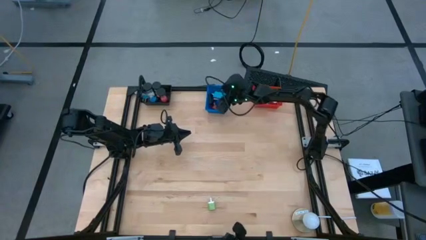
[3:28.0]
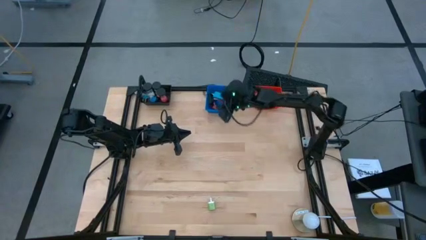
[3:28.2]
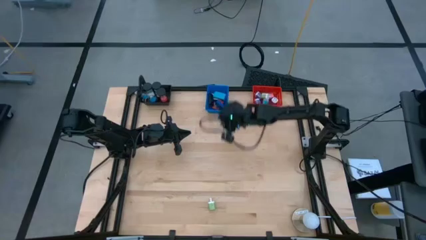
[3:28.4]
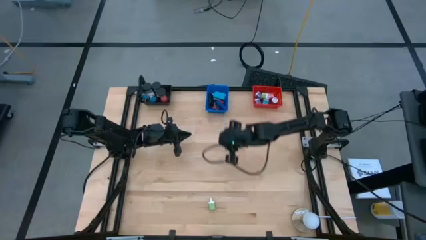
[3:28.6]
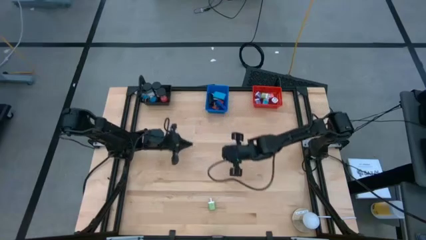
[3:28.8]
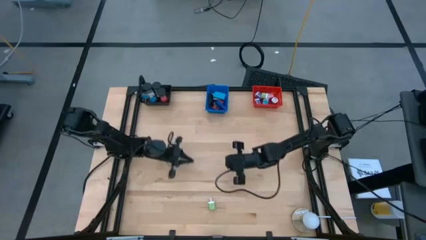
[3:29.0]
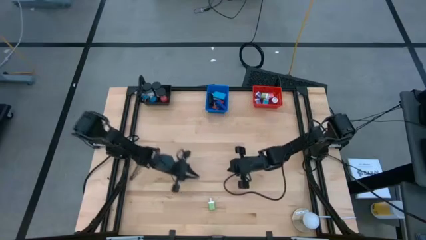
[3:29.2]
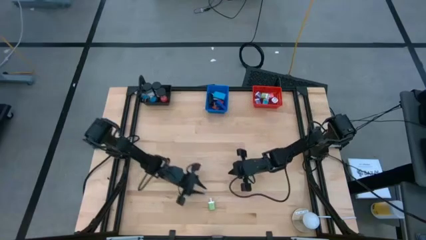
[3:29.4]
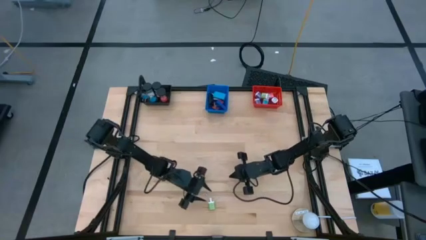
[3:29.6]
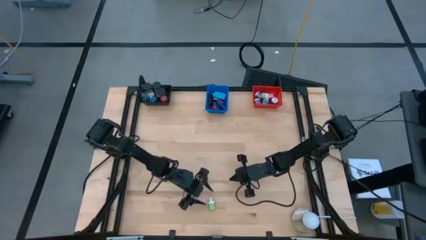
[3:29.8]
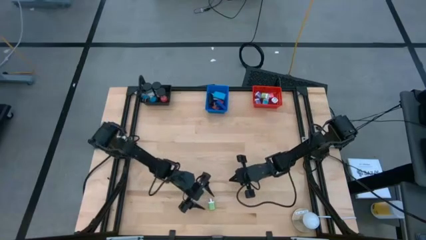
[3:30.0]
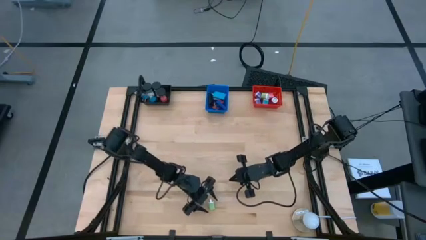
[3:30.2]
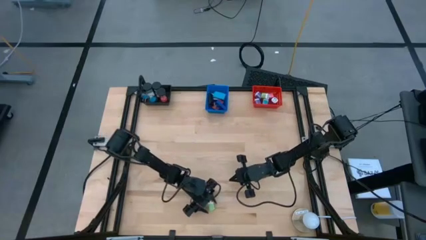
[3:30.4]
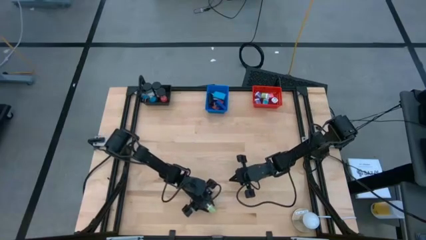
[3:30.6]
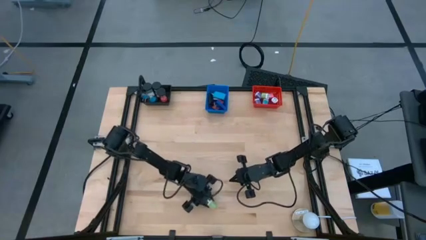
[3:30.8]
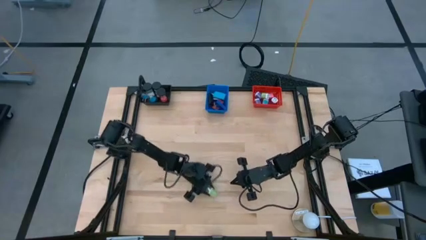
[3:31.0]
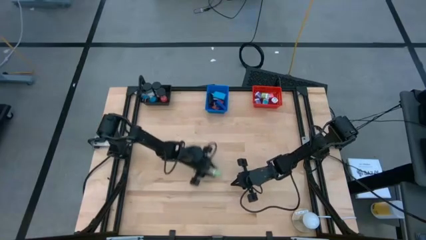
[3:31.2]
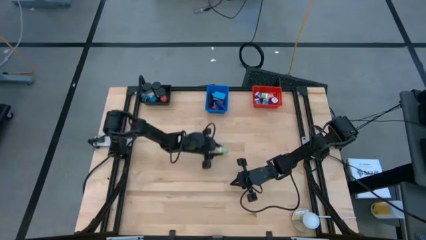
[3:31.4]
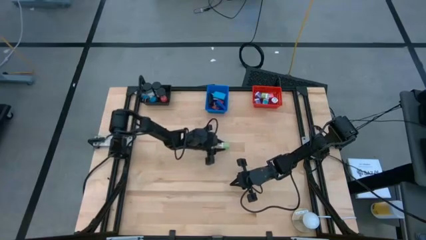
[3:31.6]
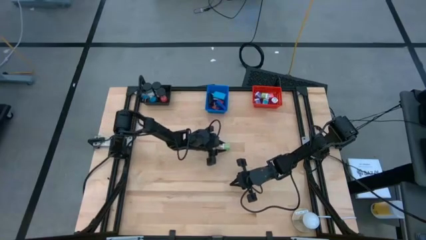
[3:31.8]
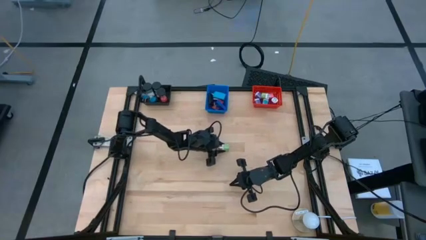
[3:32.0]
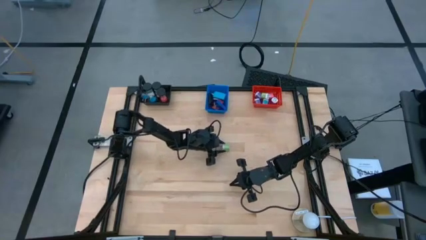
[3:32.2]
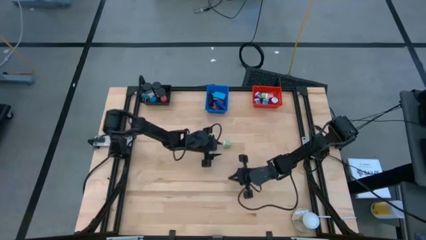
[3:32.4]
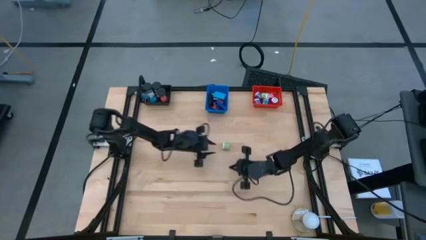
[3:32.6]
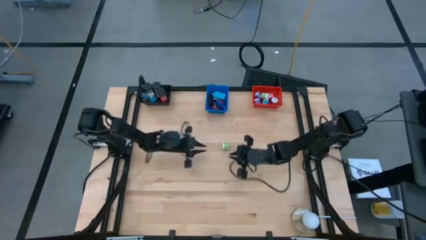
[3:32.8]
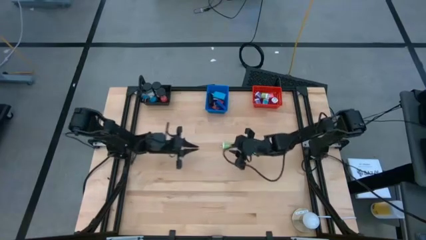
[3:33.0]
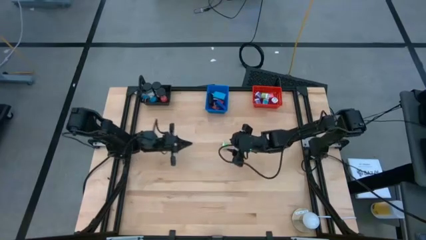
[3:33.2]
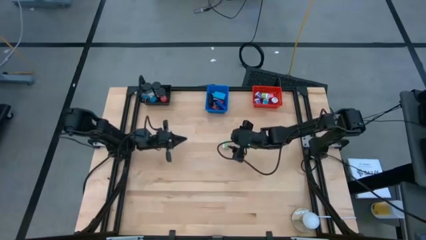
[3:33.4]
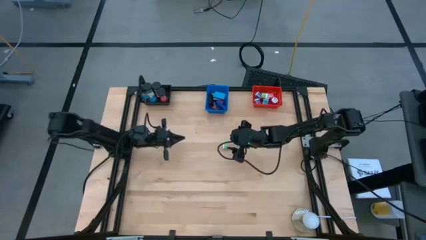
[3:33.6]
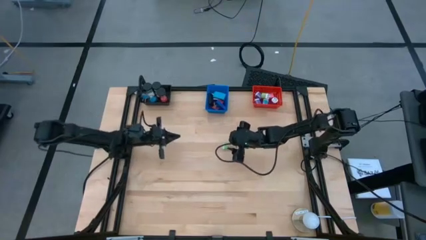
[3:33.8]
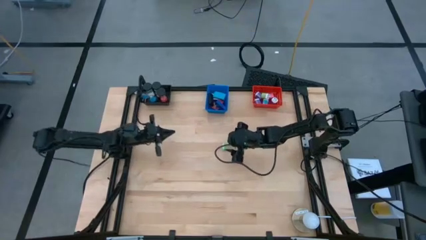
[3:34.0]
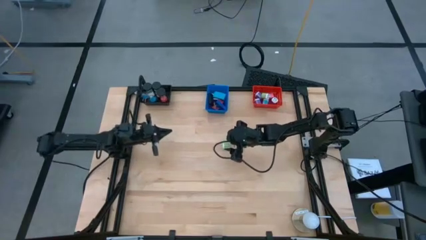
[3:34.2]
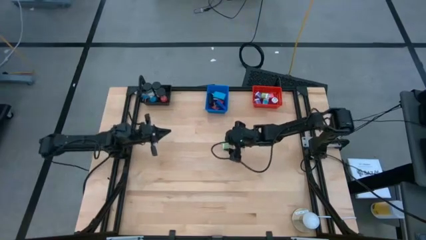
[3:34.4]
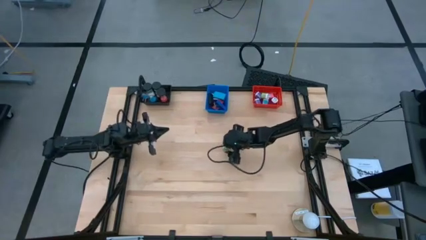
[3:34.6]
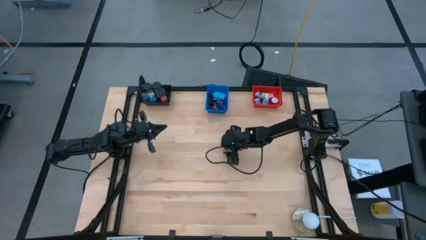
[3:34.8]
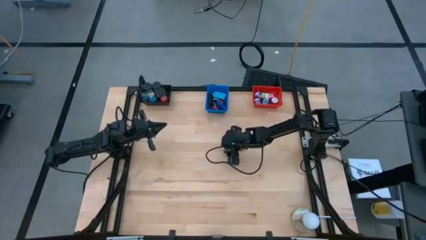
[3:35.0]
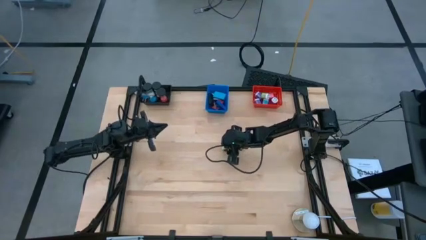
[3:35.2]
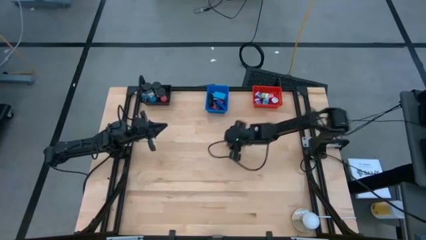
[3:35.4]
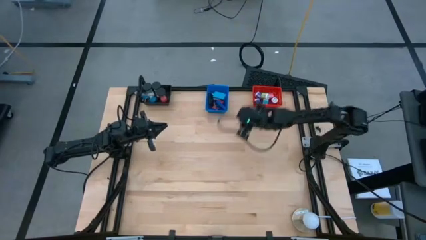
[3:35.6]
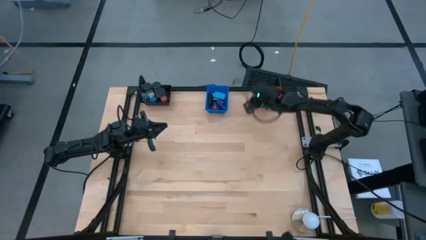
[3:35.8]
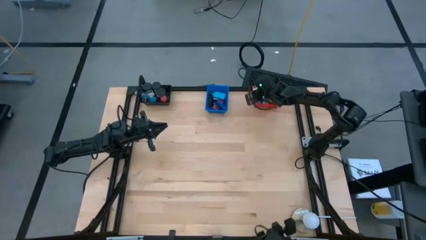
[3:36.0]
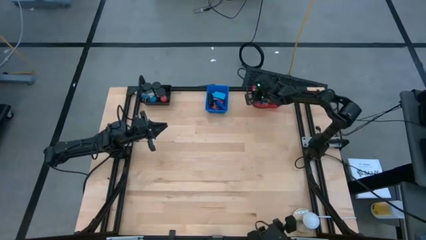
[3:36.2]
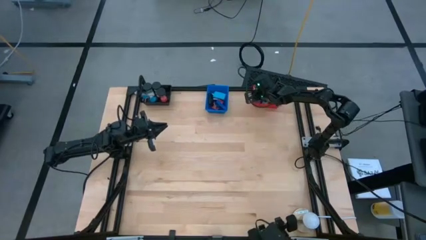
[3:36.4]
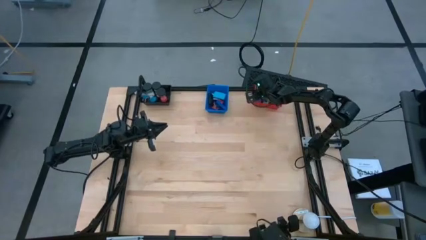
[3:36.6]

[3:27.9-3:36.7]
Task: Pick & Place Office items
Put the green charger adapter into the red basket

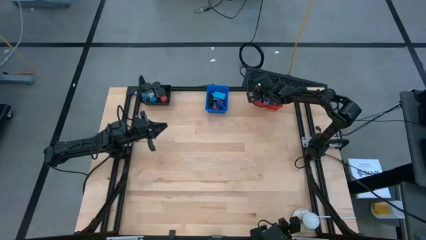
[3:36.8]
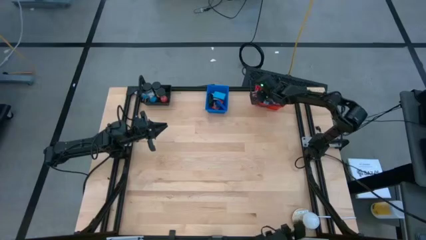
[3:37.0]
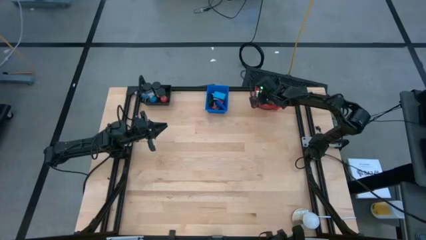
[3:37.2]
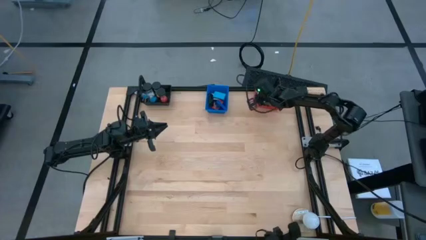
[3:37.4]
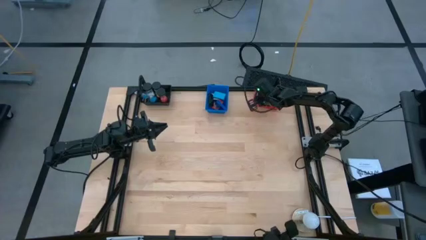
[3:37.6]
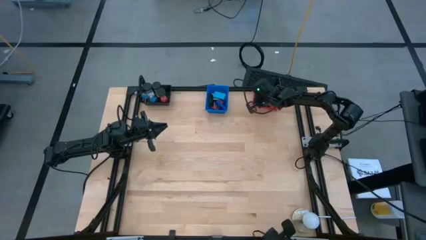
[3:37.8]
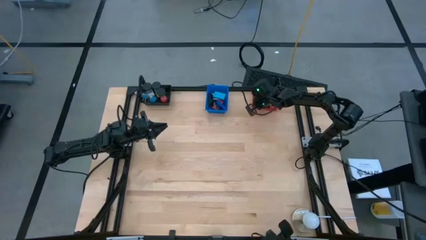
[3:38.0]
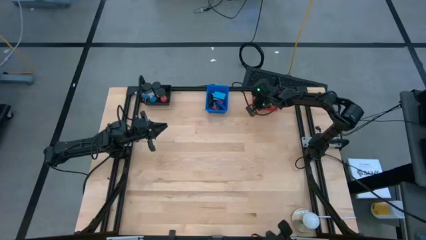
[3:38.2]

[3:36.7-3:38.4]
Adjust the red basket

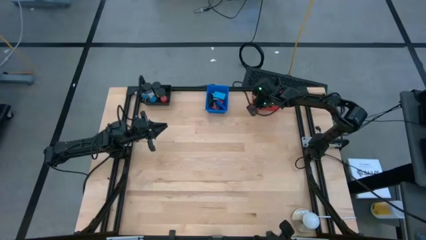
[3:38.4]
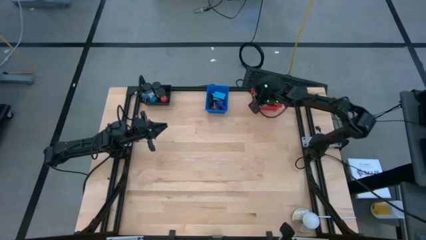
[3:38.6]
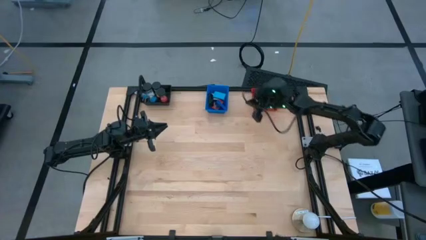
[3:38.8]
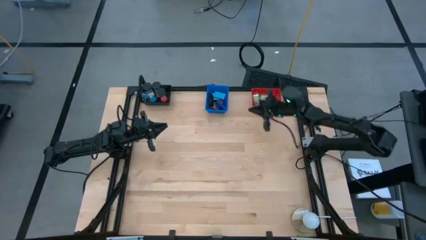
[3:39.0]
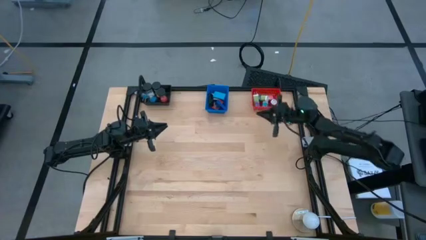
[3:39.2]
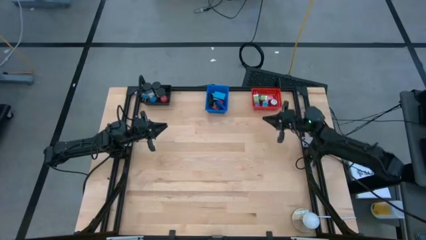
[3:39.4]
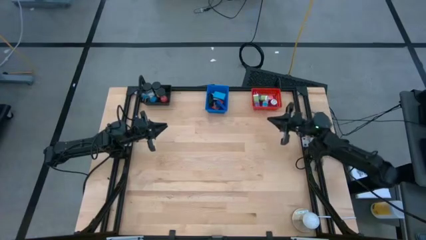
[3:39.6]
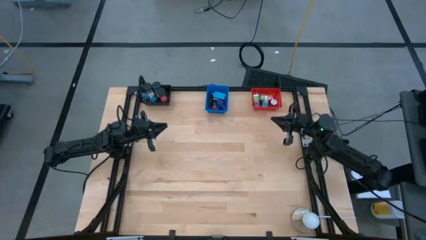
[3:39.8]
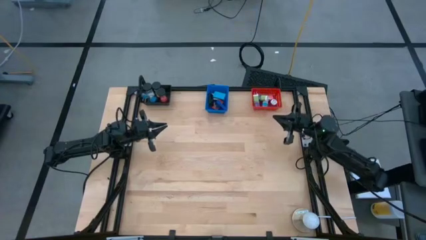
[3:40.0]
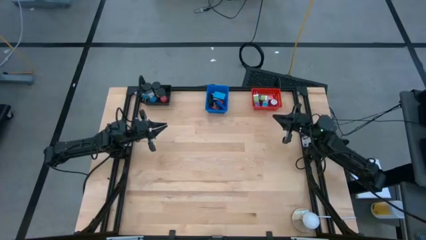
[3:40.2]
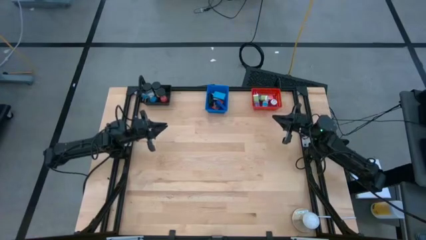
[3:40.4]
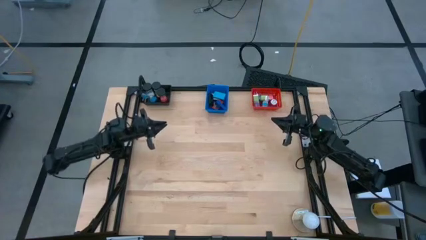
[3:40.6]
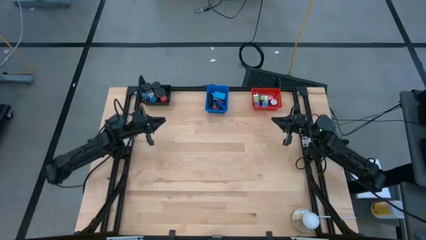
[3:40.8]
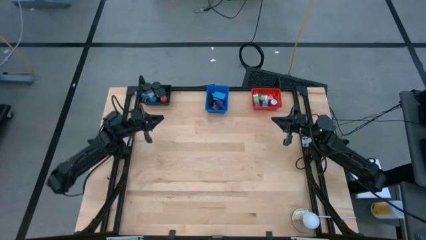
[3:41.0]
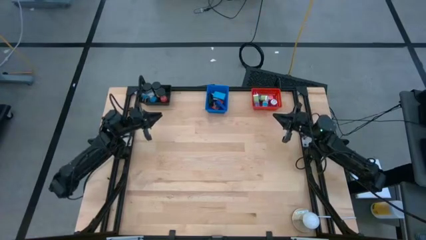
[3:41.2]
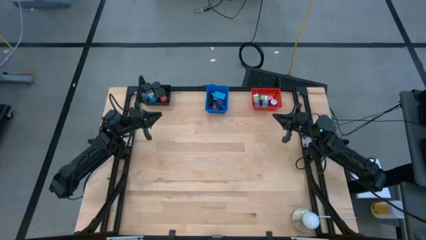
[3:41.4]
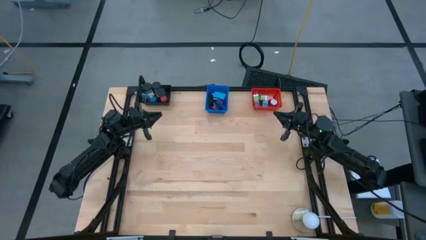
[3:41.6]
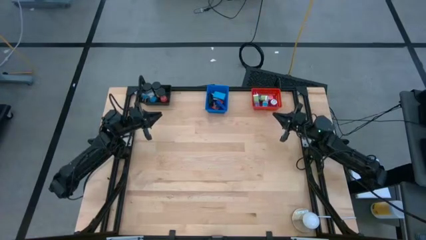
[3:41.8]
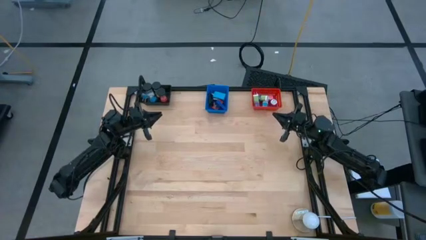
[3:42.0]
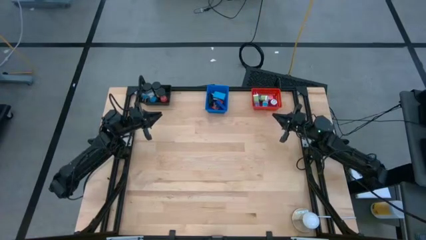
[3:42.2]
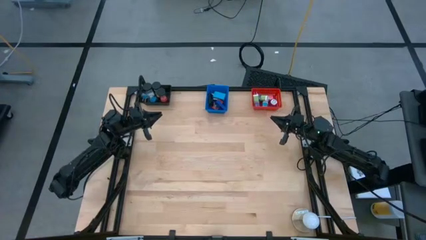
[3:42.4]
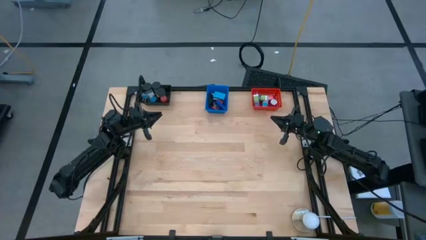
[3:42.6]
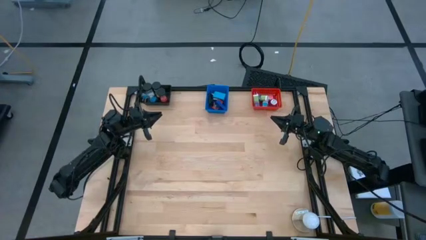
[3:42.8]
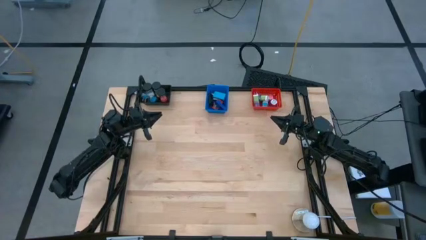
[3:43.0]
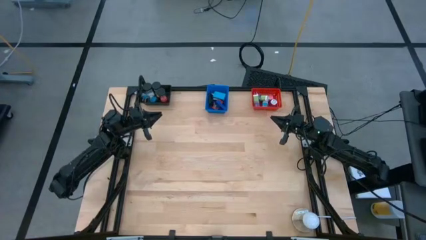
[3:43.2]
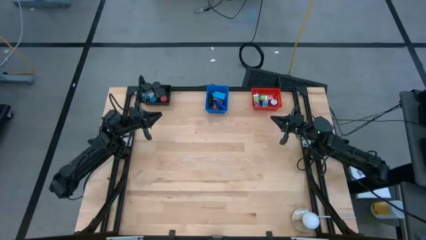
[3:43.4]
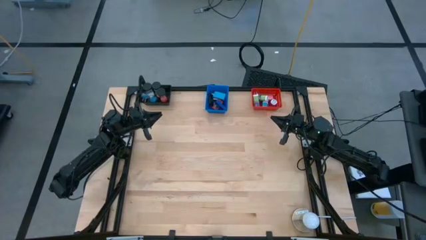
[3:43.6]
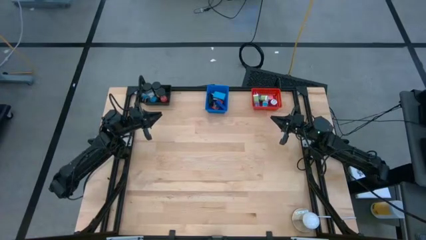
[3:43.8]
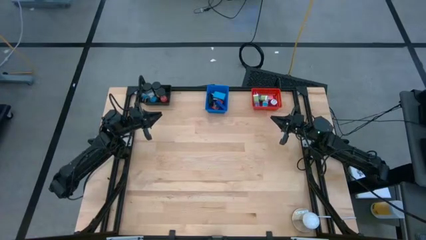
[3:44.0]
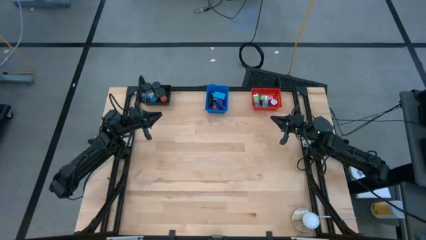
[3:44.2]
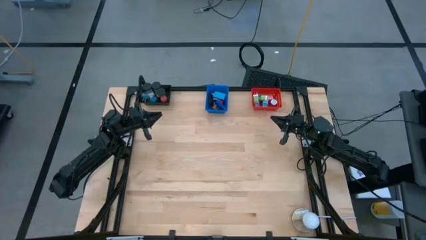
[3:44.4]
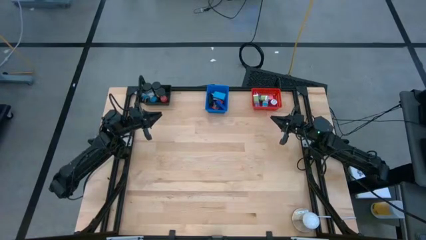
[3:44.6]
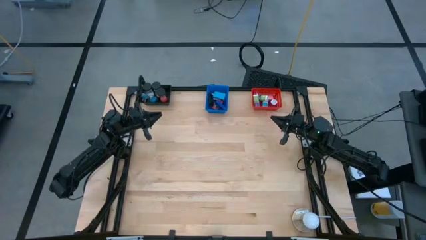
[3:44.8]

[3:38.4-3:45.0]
Return to Home Position
